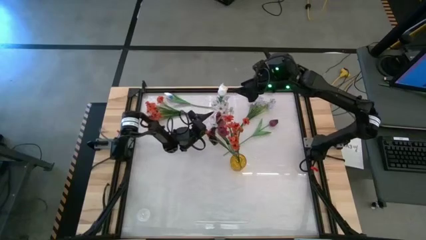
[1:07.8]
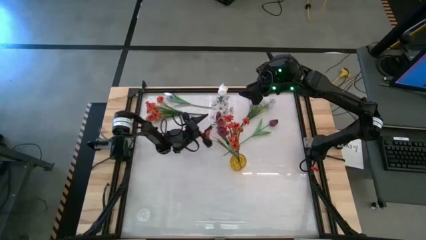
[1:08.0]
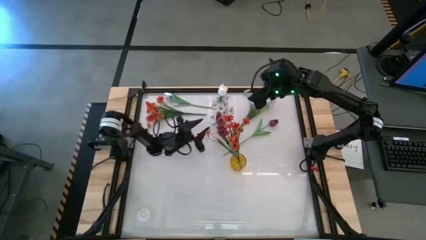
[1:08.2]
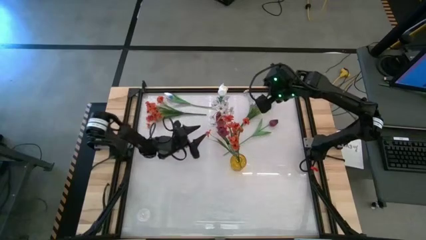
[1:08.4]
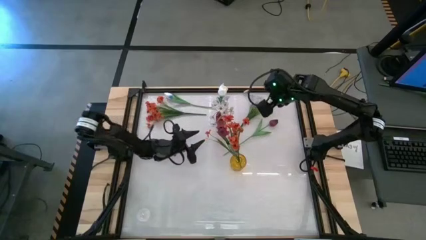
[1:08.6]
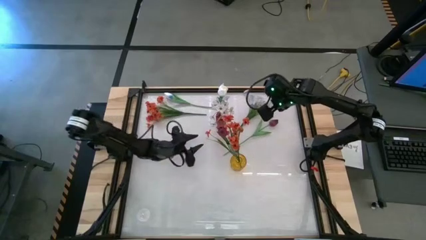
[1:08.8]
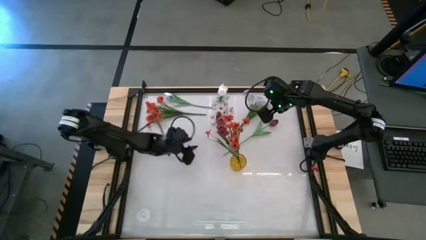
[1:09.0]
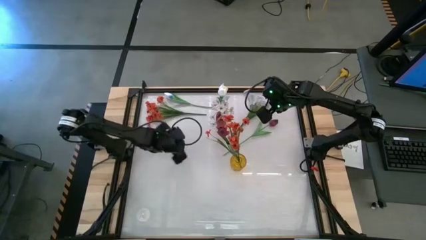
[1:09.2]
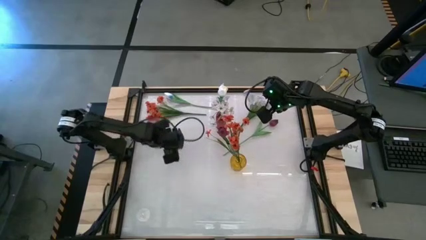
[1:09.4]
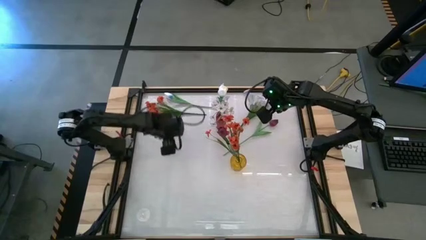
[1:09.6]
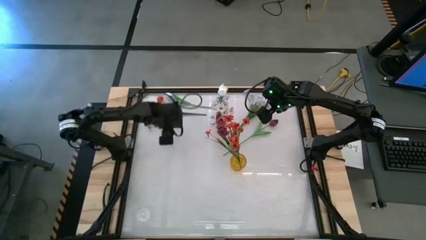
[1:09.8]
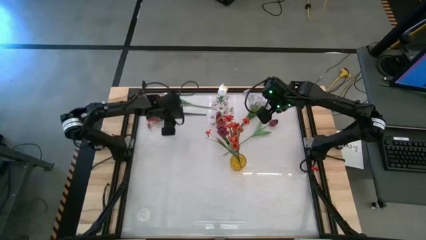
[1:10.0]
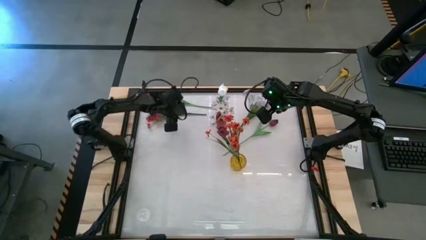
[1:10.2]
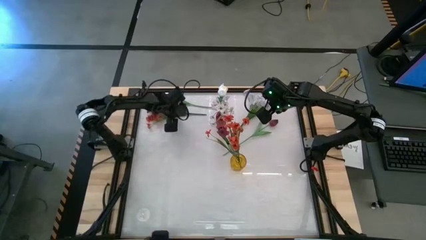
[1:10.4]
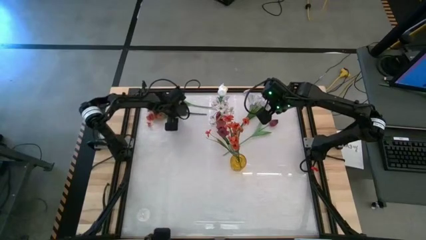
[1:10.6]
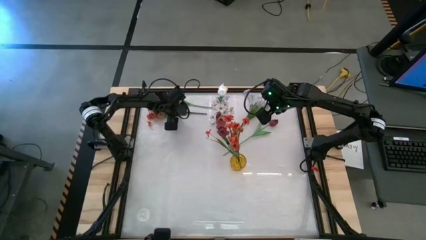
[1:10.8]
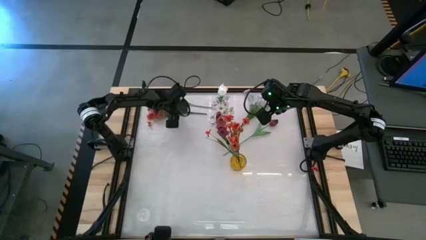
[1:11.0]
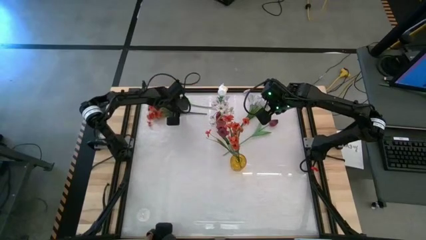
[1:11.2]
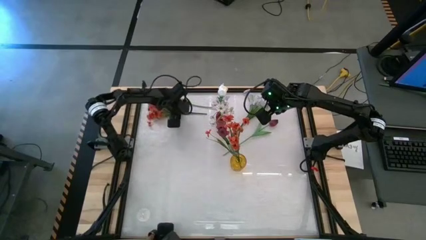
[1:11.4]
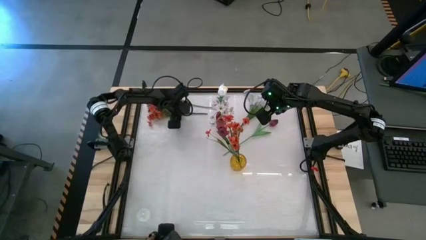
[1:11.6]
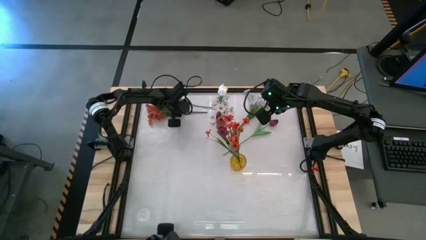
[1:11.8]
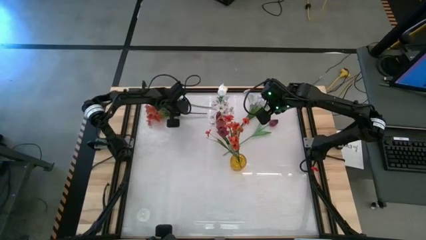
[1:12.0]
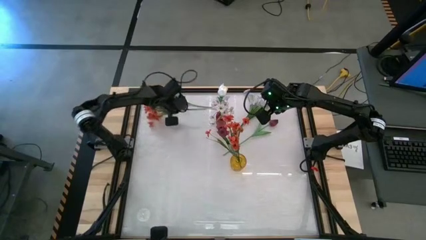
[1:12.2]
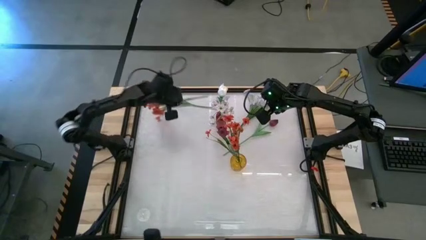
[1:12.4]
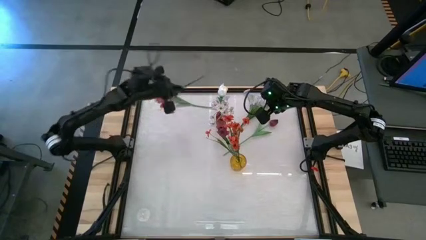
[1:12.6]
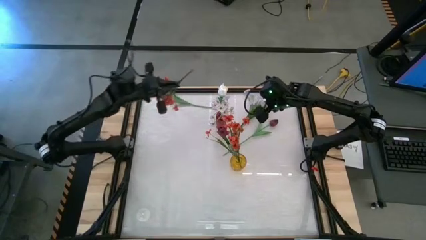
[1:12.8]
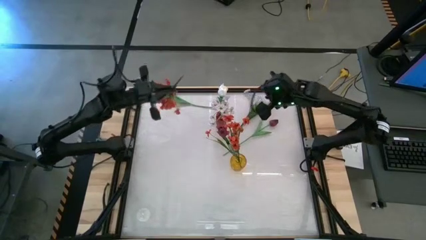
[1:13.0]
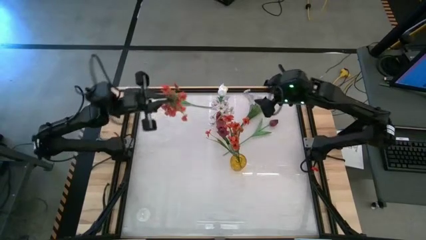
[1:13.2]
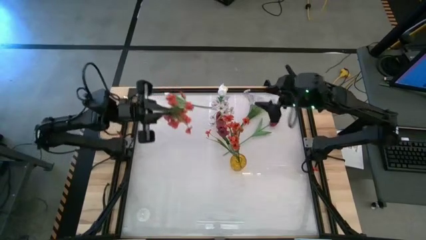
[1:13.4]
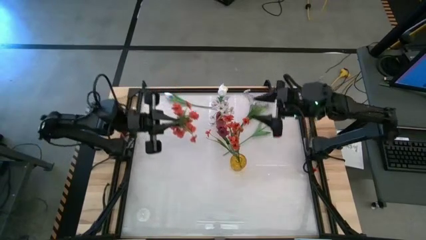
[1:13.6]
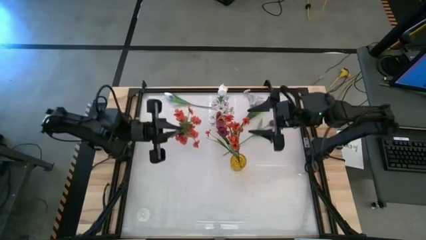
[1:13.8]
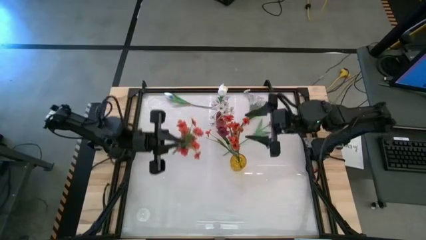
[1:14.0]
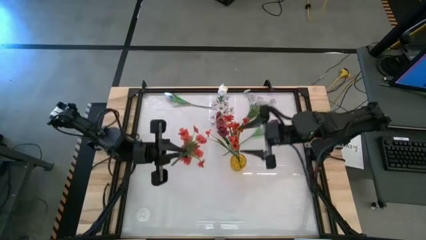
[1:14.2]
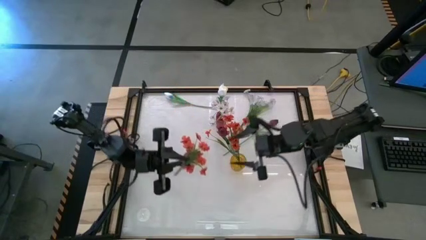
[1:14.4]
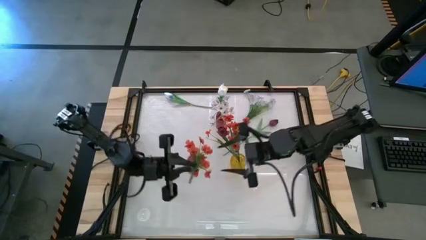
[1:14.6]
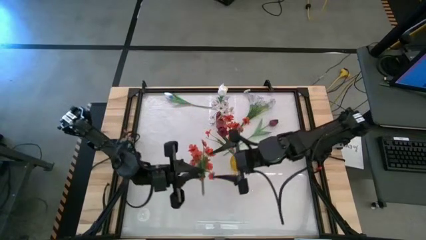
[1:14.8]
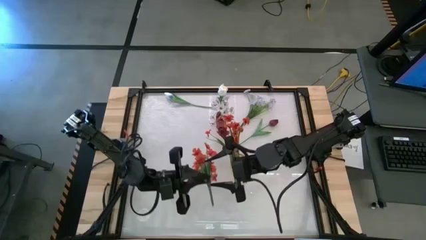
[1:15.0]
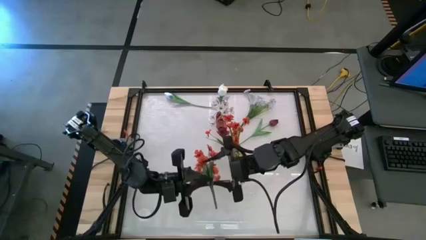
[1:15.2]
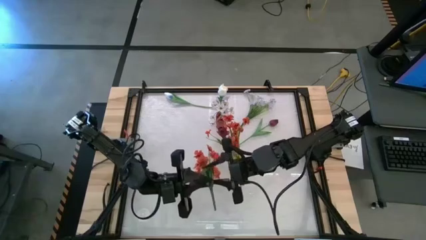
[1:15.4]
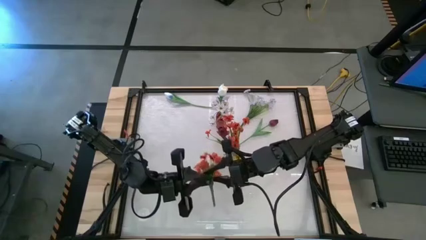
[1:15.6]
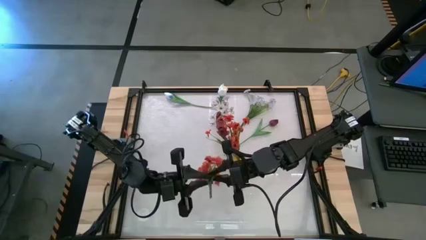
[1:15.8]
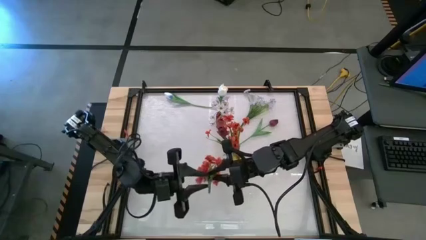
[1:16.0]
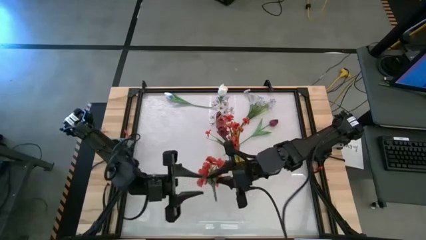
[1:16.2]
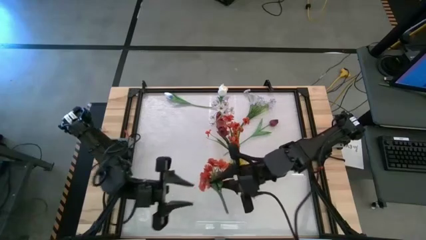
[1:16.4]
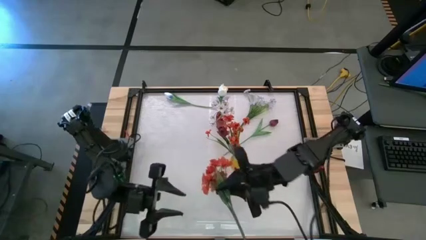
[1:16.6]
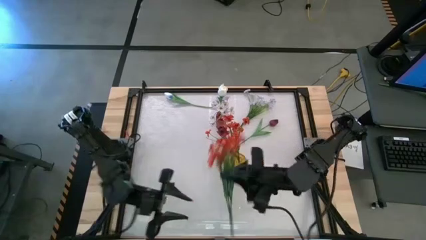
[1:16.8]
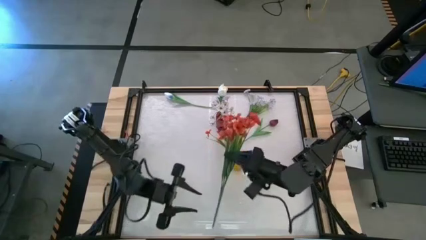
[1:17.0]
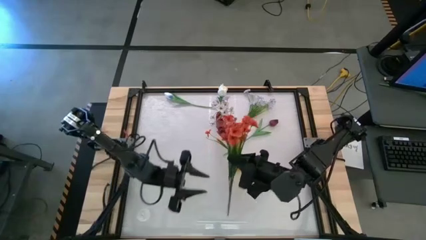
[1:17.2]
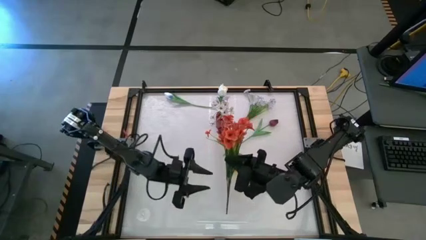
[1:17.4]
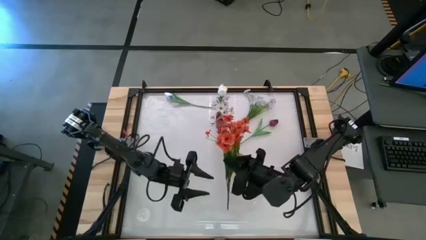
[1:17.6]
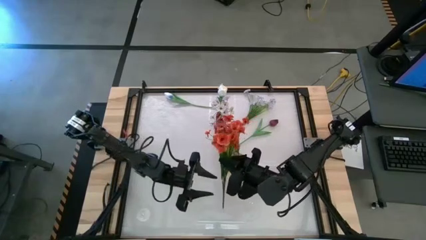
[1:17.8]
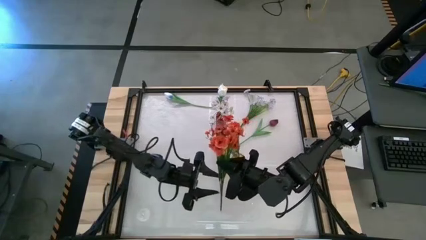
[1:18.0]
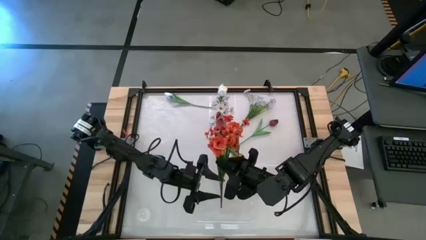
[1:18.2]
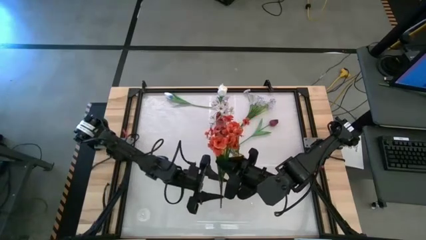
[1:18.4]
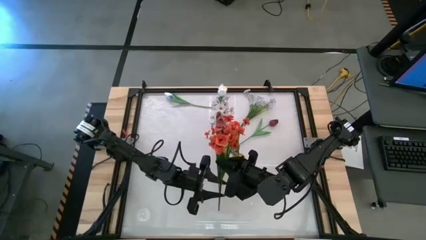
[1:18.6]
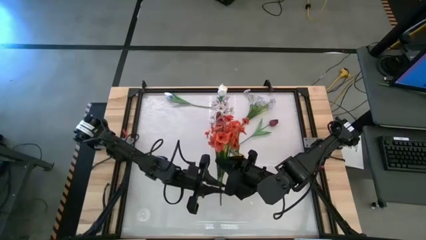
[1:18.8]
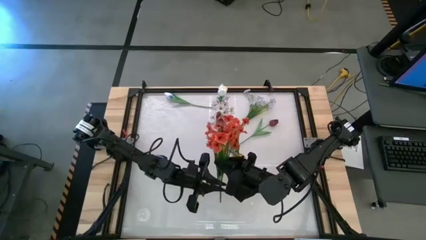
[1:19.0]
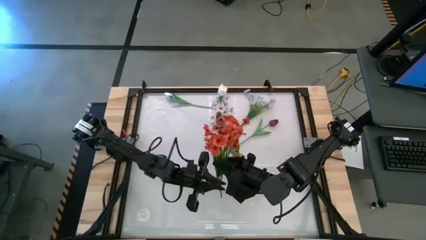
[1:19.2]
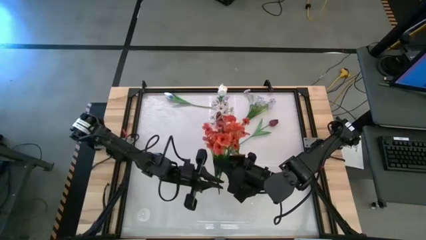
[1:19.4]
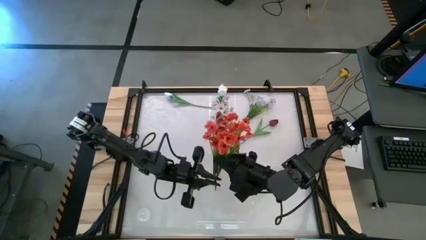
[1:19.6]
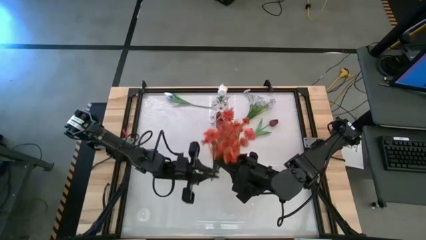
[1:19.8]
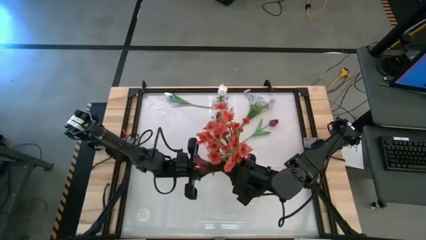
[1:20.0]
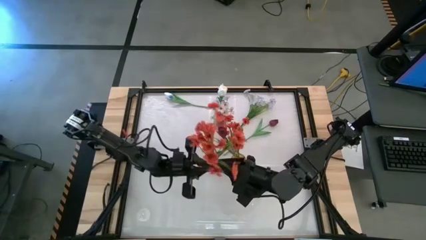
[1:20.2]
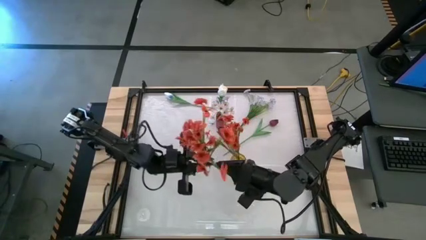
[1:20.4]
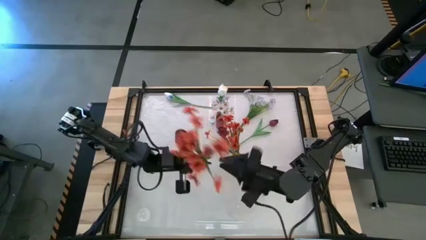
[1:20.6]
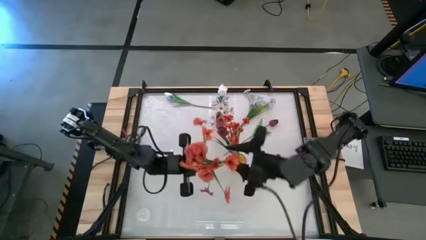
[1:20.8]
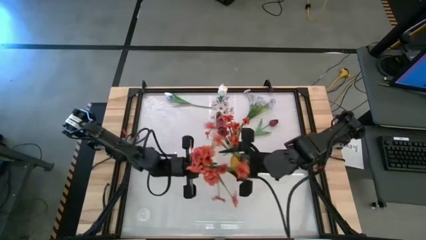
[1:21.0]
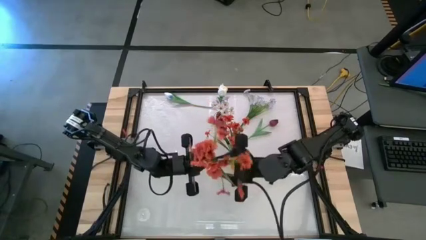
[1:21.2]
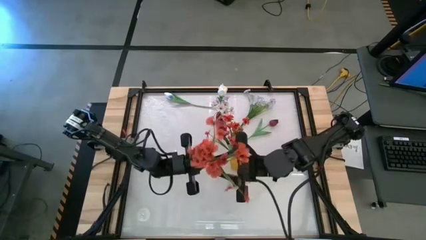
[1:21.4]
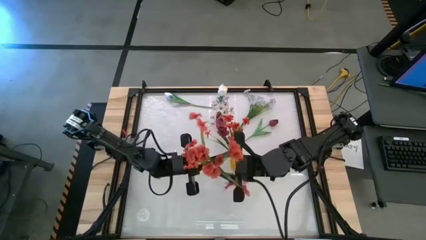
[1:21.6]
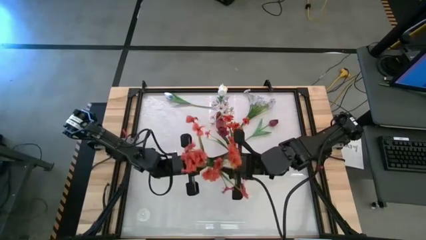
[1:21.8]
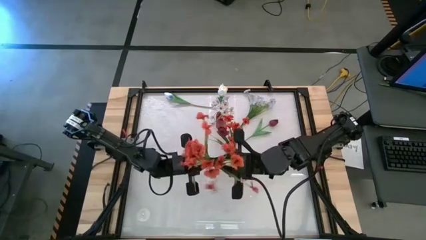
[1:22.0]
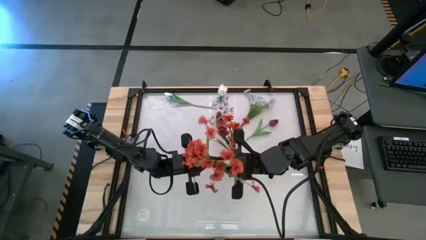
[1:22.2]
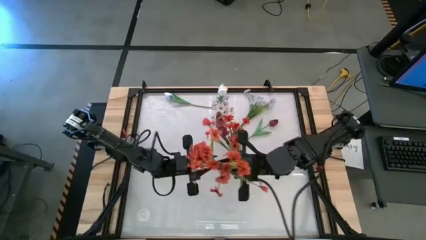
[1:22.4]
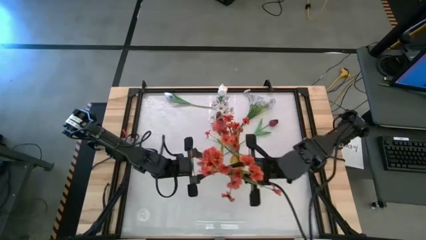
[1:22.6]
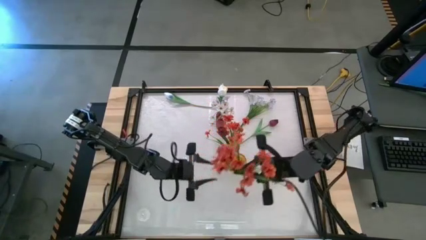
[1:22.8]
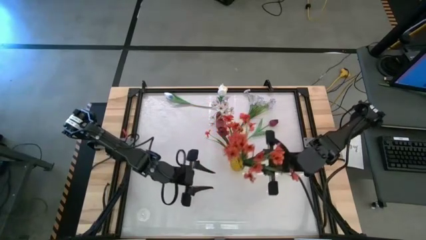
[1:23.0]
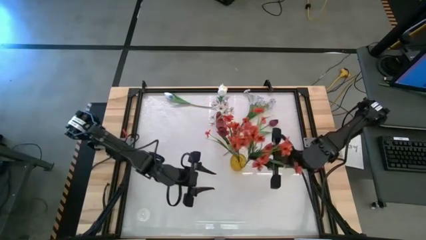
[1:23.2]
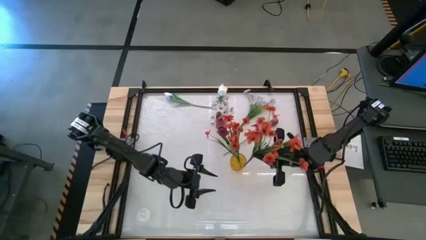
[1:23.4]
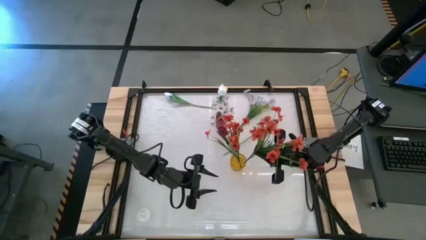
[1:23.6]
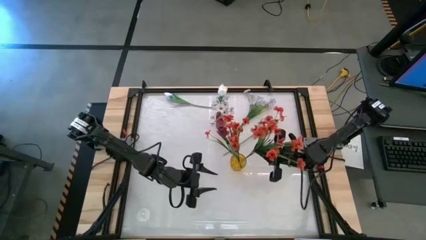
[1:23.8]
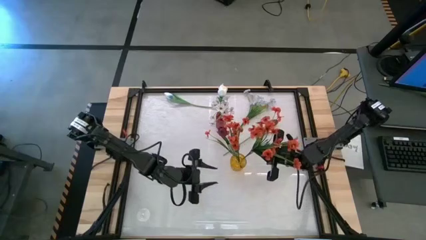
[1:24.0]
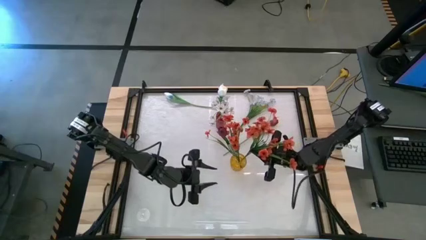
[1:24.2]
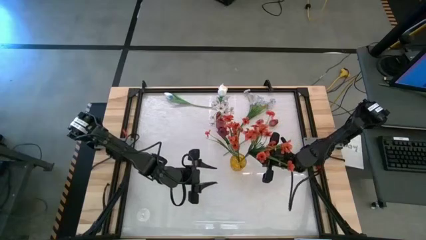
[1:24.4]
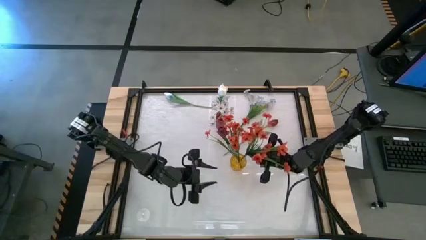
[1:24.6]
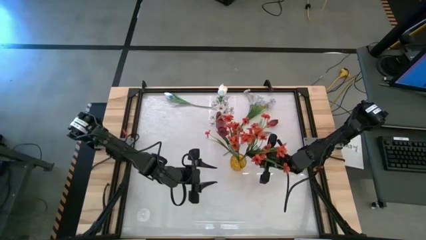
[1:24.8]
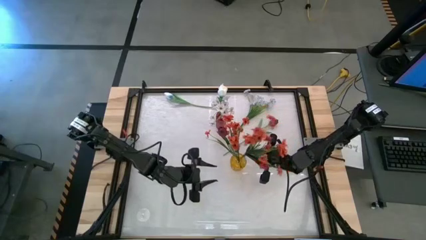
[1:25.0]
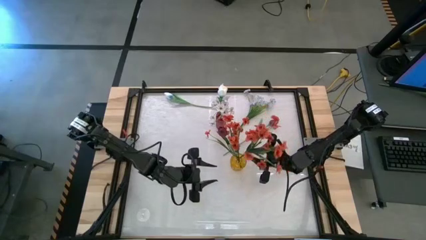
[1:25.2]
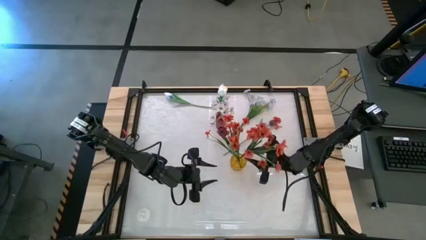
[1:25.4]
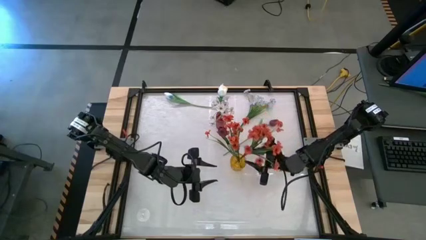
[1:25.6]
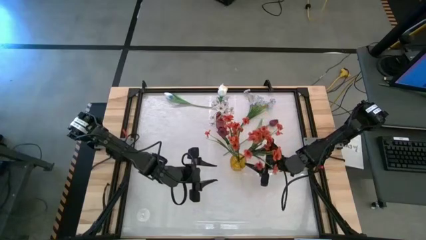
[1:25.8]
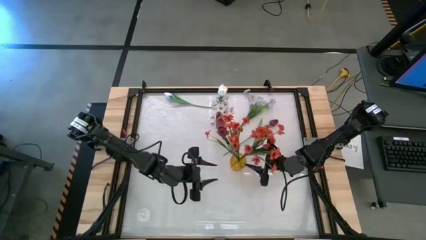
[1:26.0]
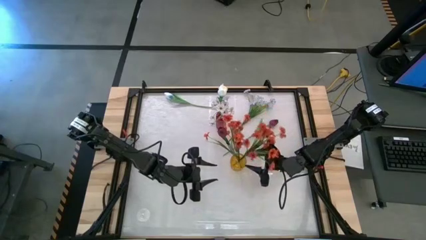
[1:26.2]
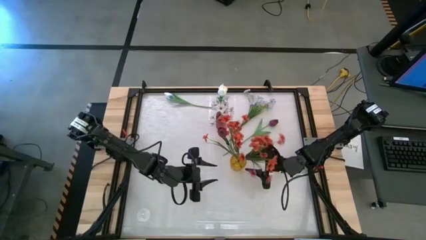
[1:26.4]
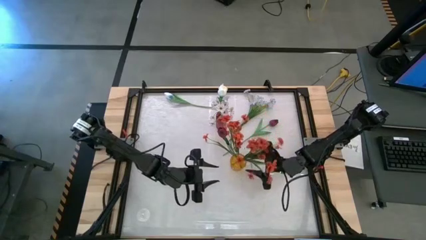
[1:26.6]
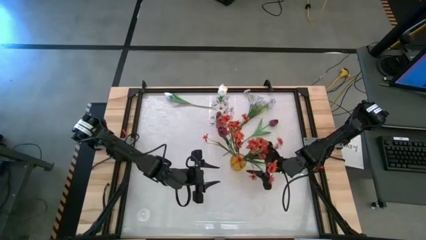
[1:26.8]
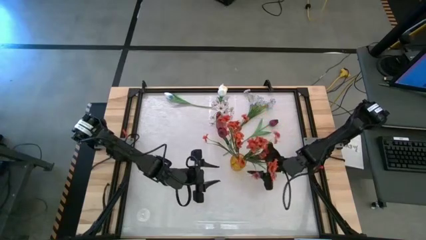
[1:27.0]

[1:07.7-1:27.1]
Task: Sort flowers into vase by color
Put the orange flowers into the yellow vase
